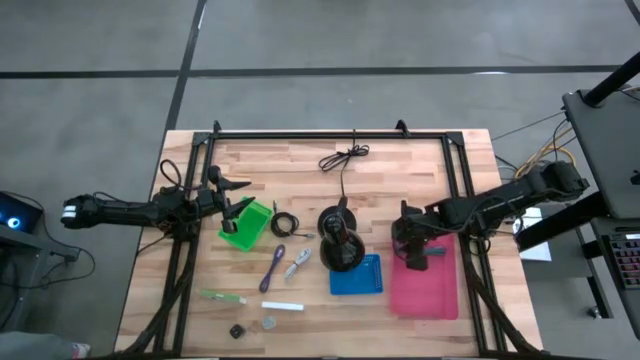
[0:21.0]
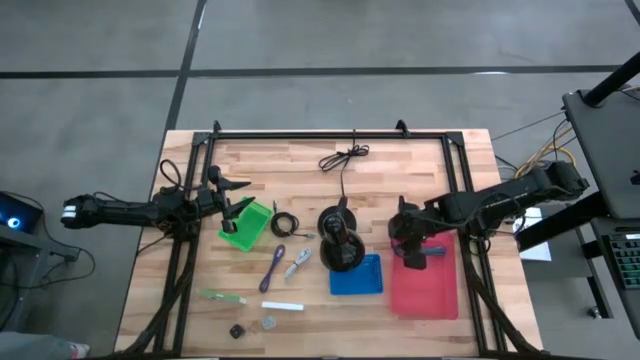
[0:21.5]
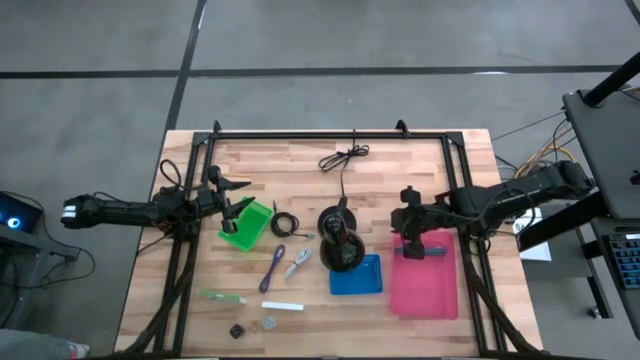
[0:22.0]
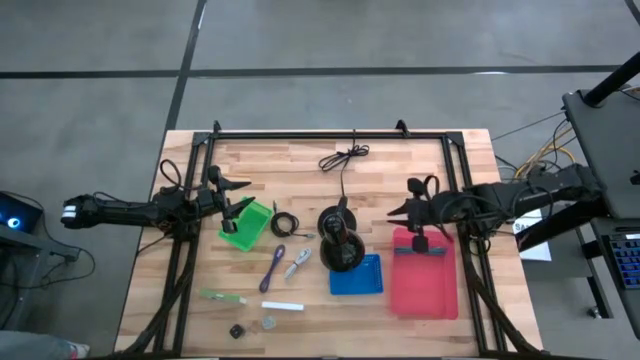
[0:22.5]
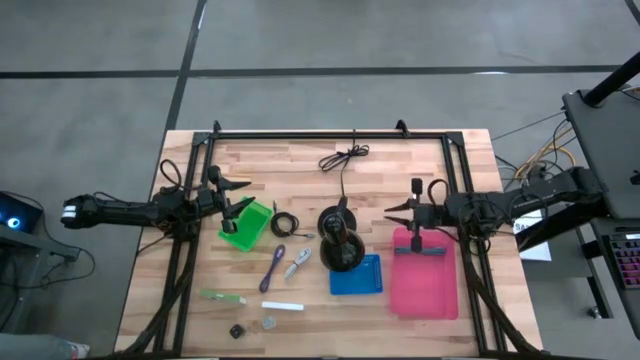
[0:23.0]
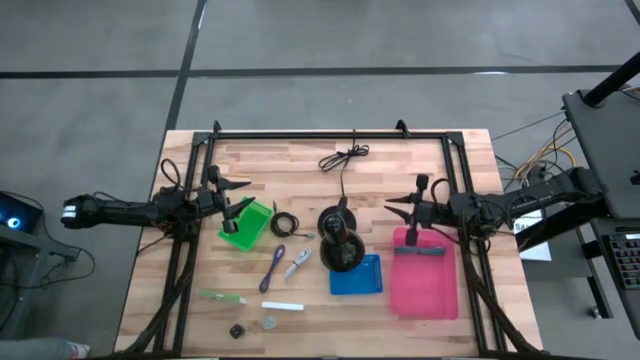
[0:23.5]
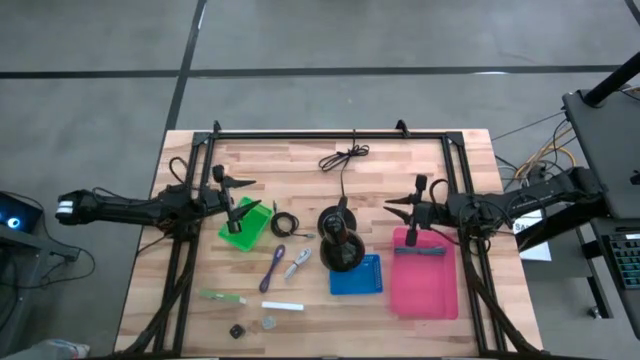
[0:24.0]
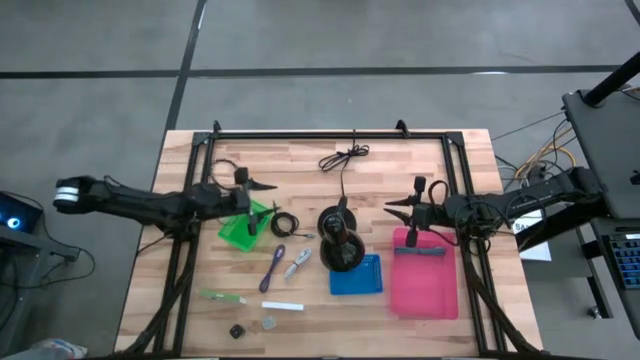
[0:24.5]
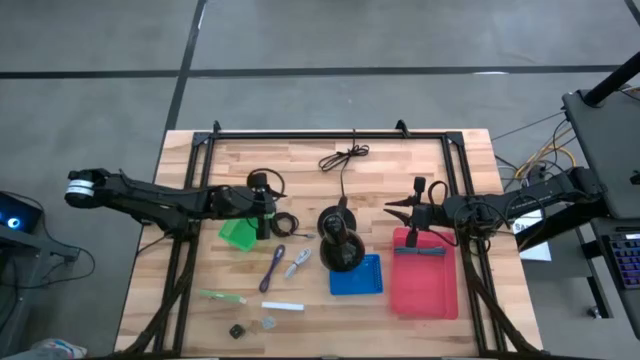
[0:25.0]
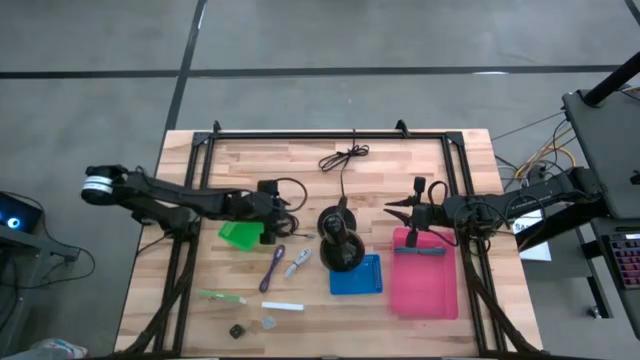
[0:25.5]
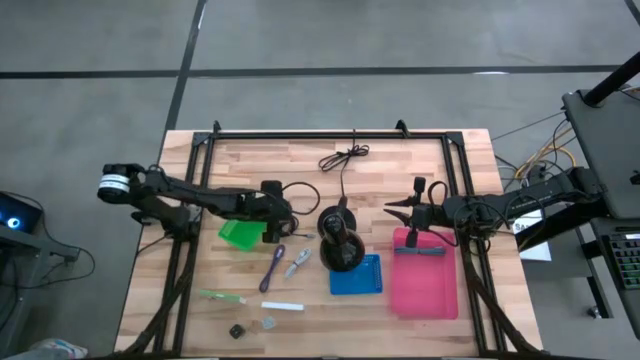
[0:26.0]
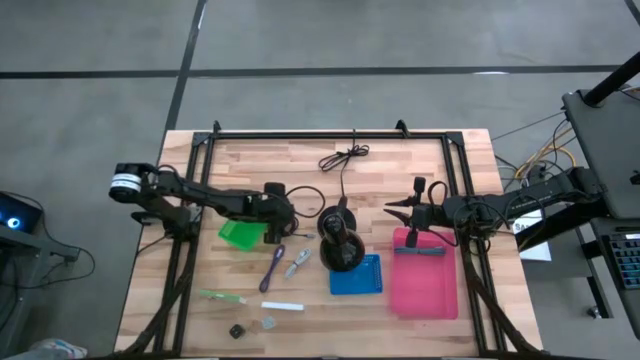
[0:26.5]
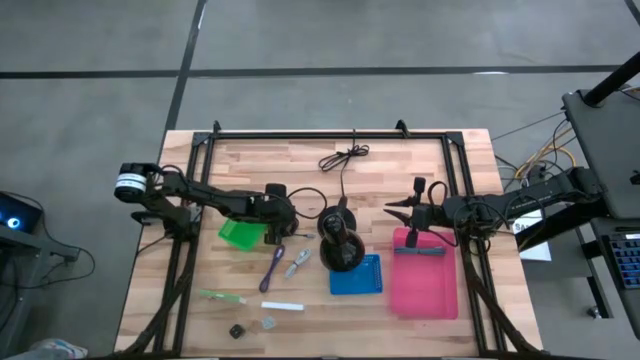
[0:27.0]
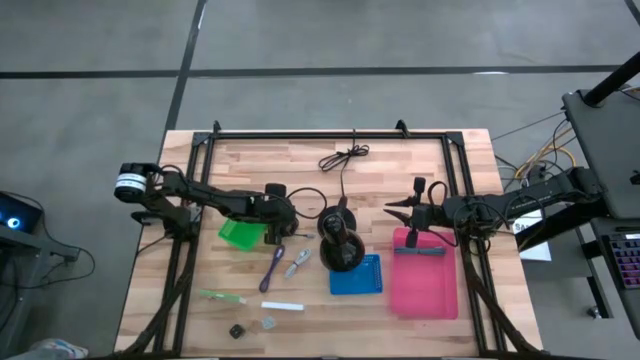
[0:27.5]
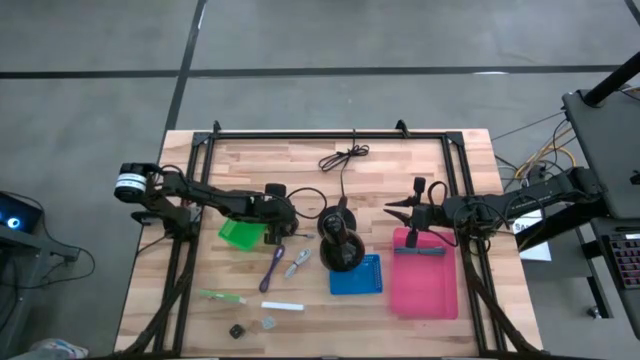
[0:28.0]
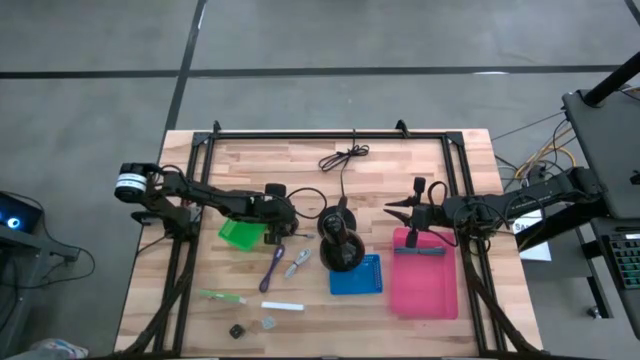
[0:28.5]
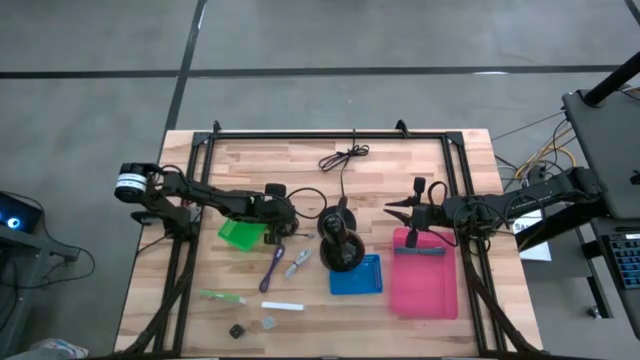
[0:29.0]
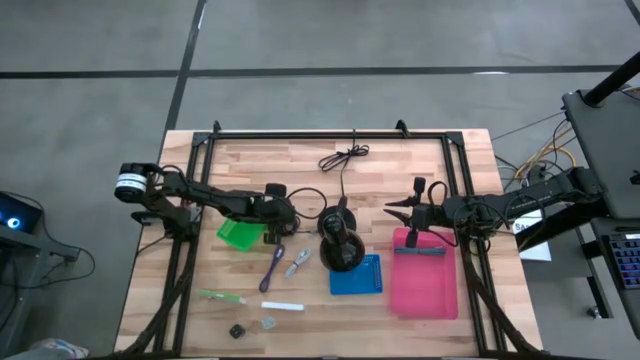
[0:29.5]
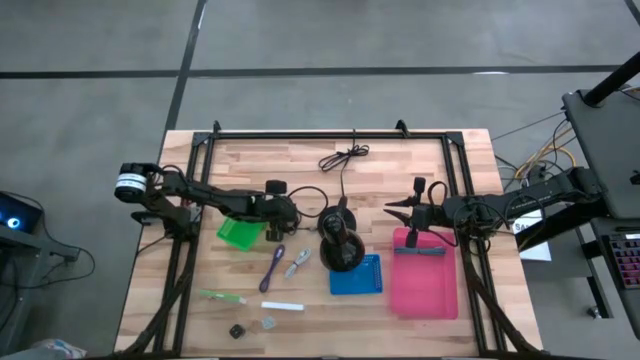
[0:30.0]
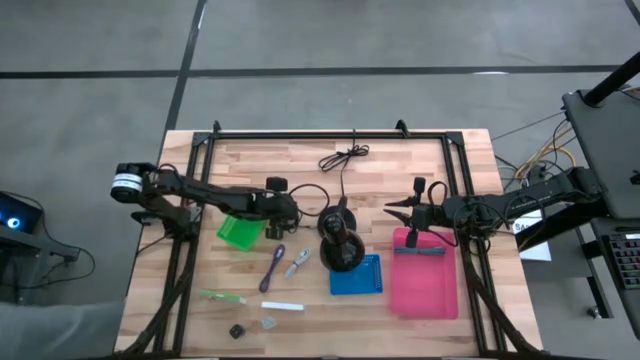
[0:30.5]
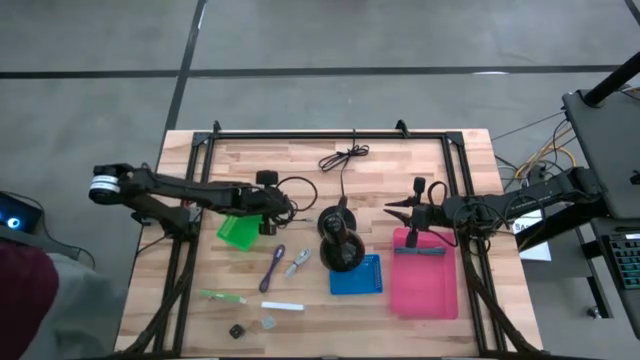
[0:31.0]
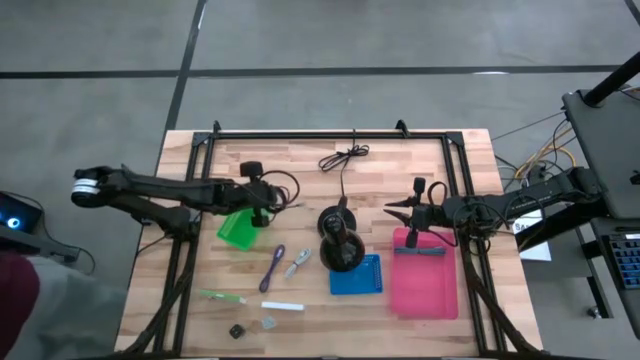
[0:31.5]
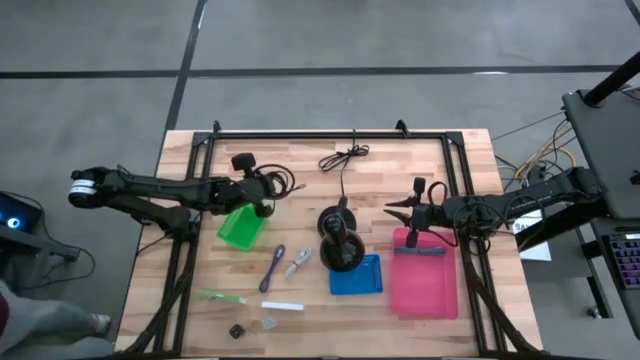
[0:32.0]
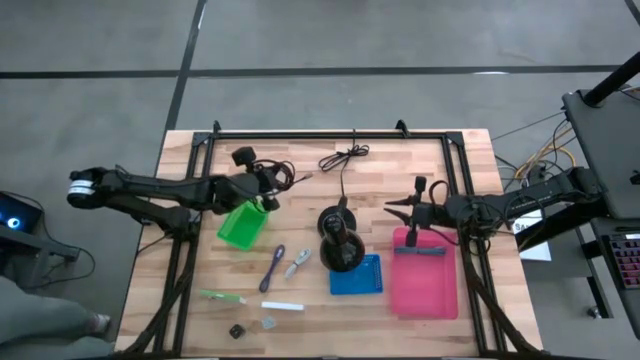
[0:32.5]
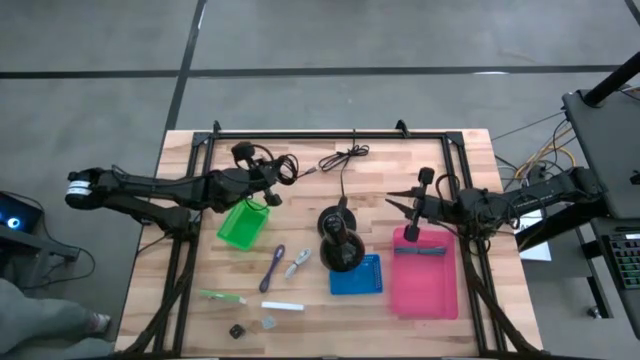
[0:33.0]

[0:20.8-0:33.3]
Task: Pick and place items into bin
Put the black charger cable into the pink bin

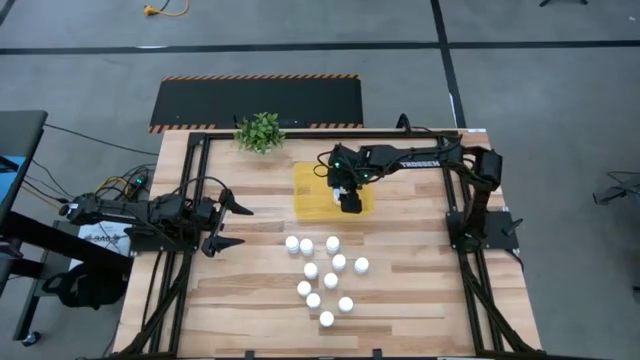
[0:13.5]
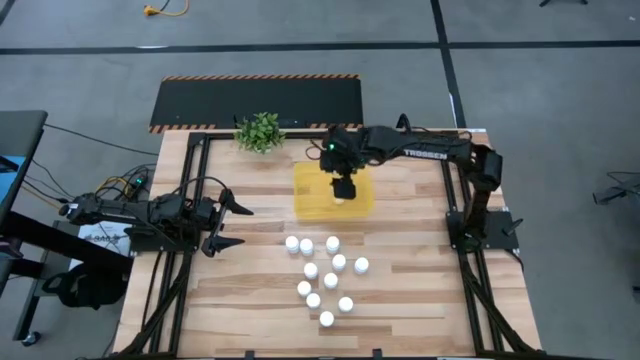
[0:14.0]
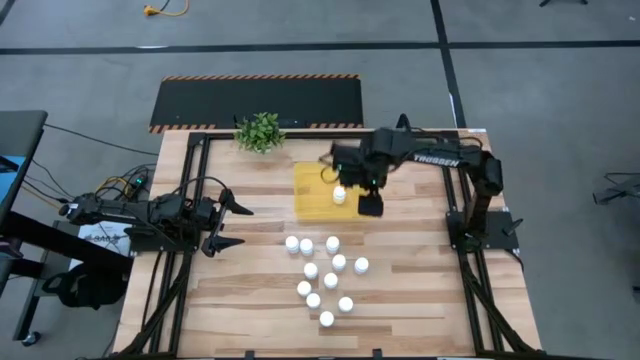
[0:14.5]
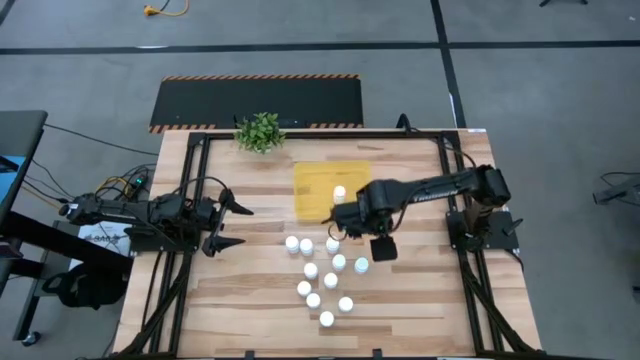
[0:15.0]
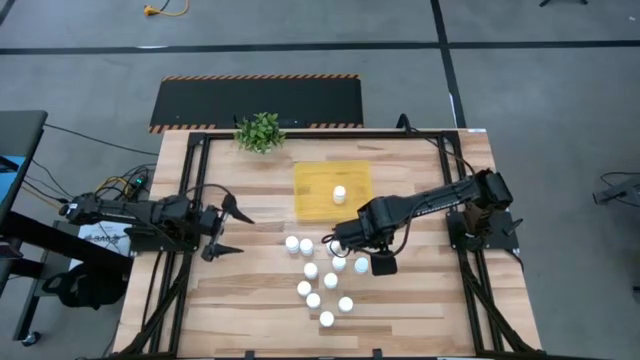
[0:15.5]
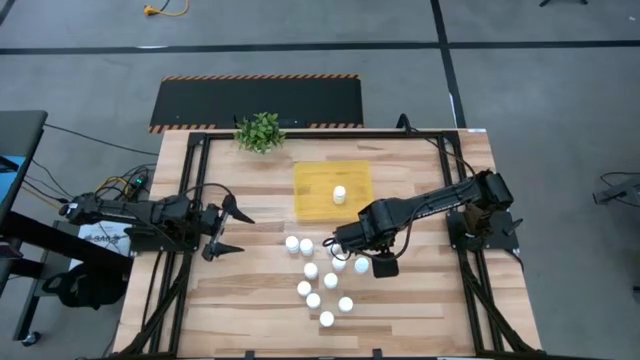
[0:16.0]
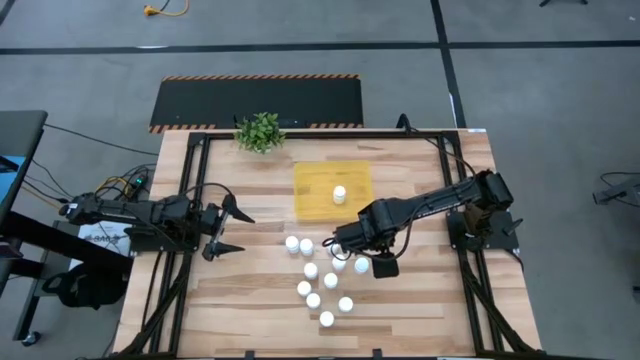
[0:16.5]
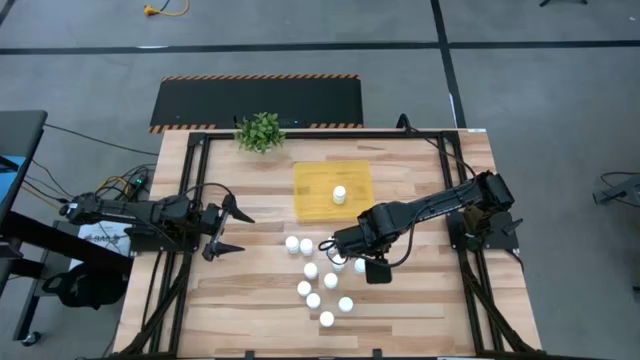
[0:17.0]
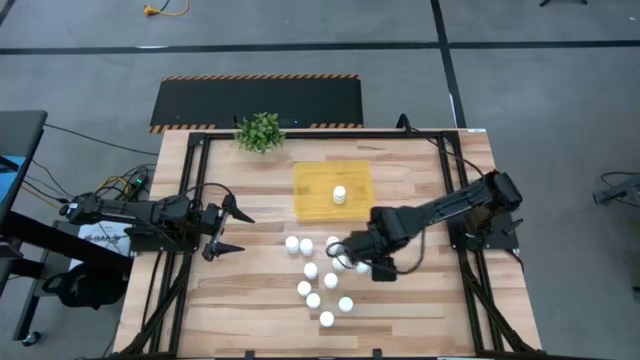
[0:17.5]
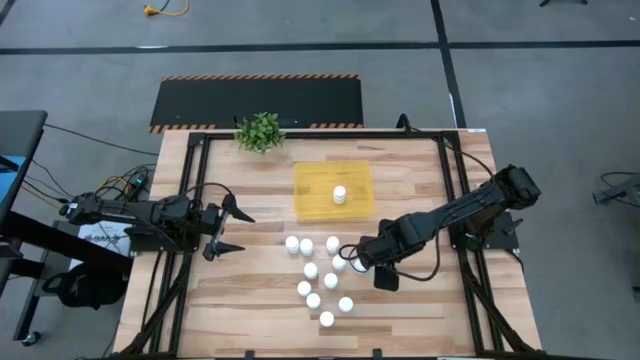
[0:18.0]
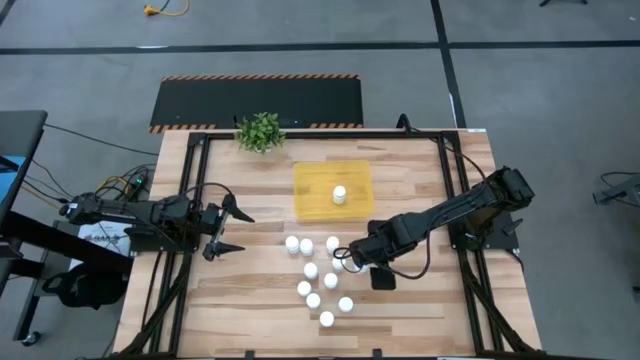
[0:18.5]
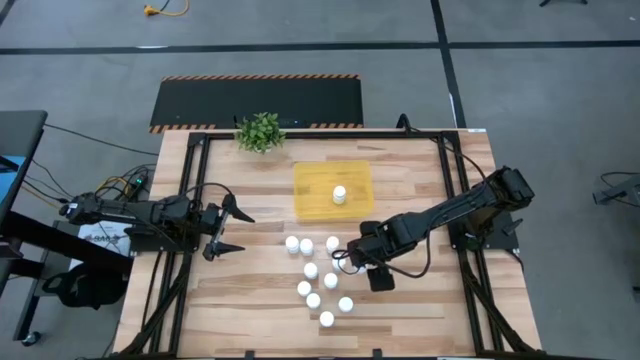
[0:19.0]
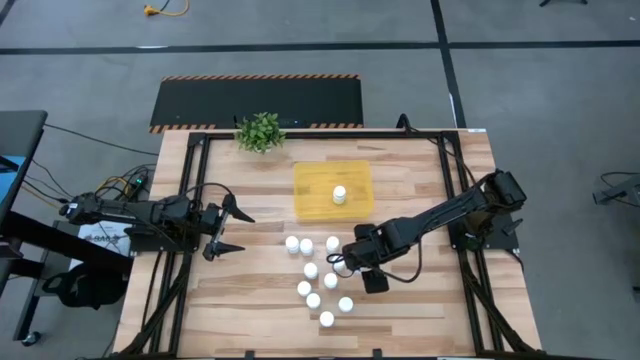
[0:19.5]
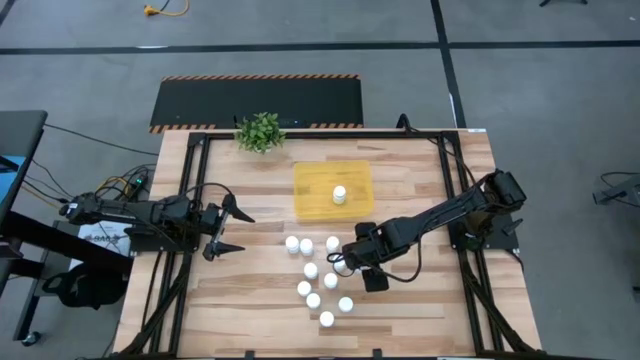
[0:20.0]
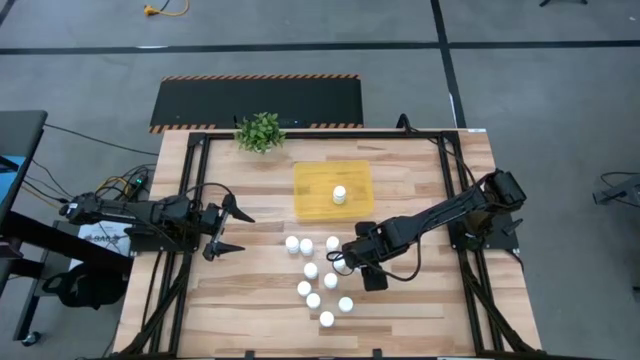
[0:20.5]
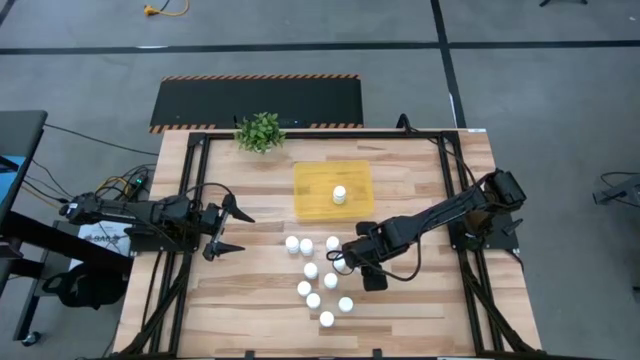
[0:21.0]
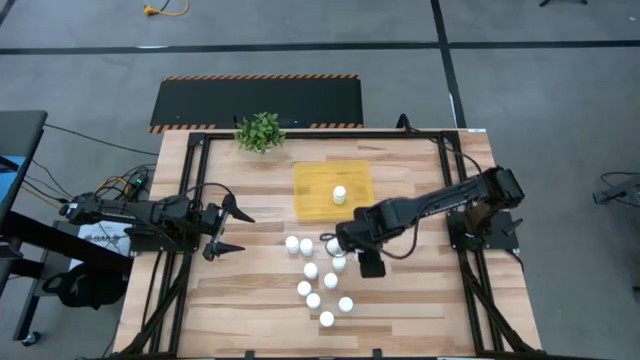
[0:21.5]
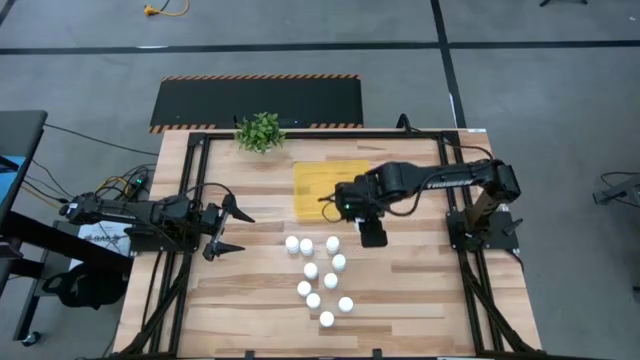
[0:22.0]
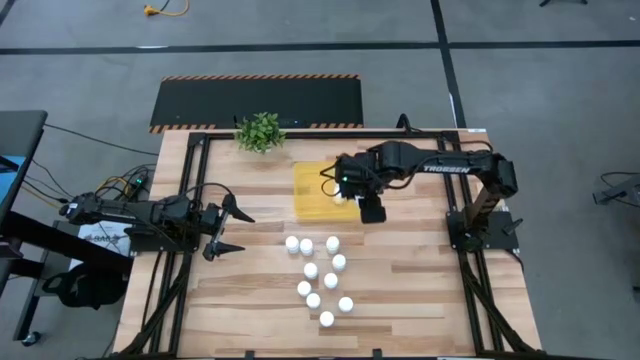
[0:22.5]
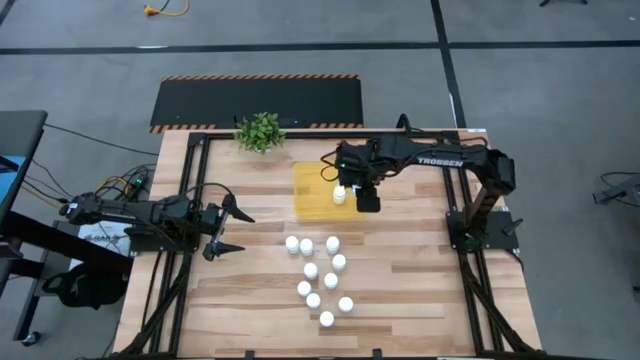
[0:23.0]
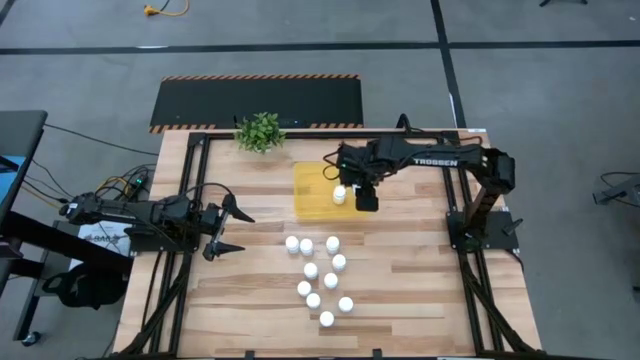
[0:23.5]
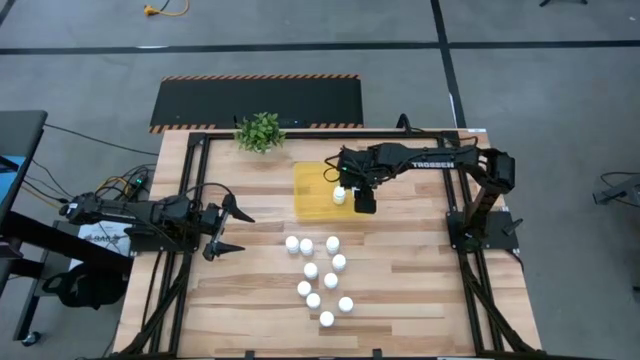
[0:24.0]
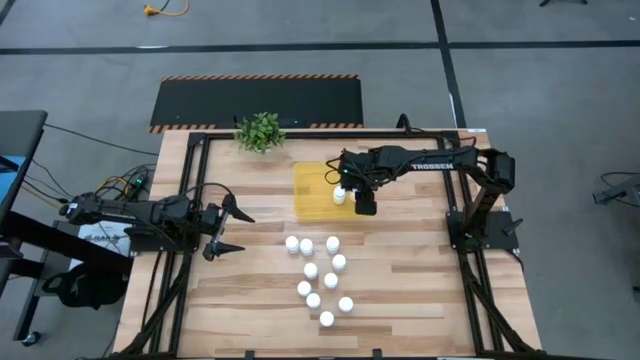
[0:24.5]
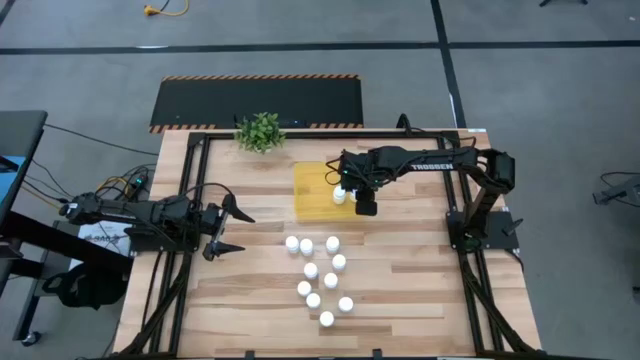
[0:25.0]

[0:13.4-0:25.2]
Task: Pick and place pill bottles into a basket
Put the white medicine bottle into the yellow bin
